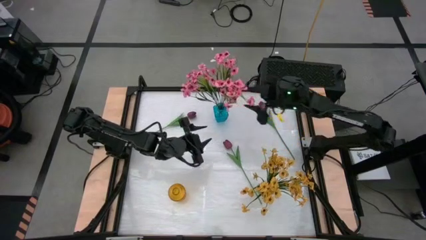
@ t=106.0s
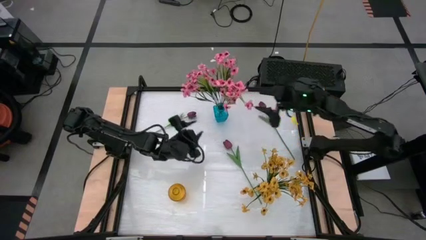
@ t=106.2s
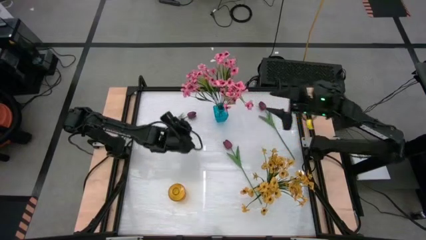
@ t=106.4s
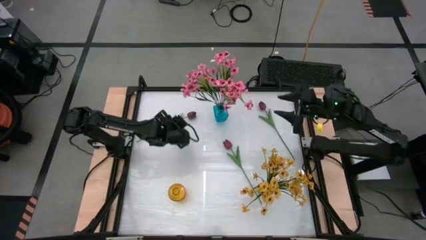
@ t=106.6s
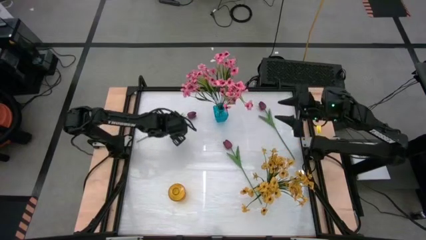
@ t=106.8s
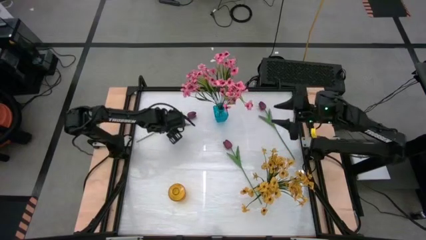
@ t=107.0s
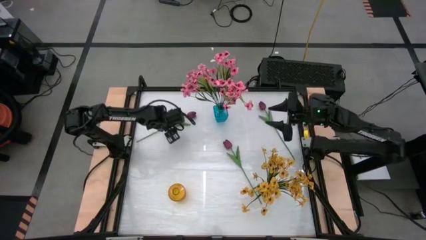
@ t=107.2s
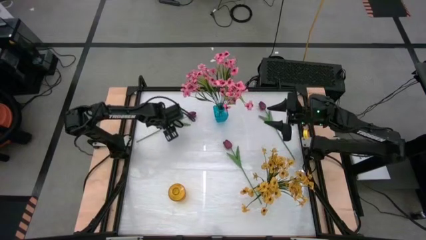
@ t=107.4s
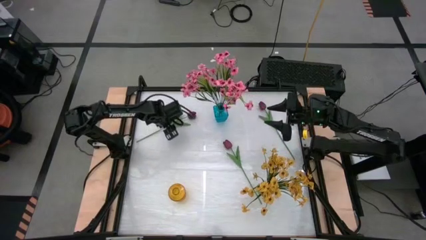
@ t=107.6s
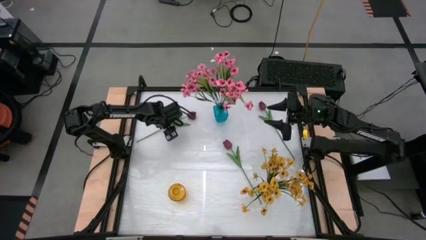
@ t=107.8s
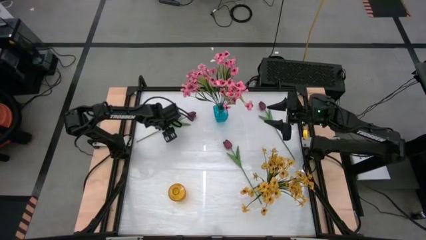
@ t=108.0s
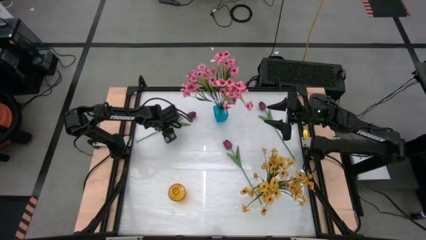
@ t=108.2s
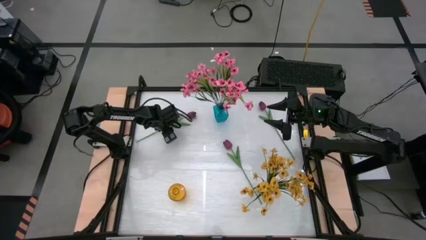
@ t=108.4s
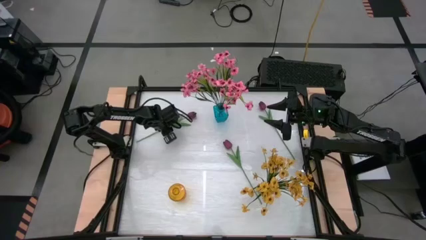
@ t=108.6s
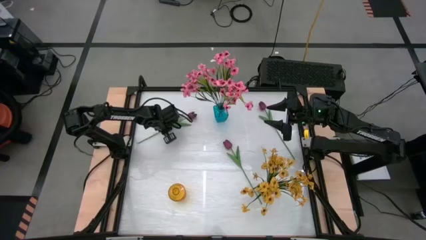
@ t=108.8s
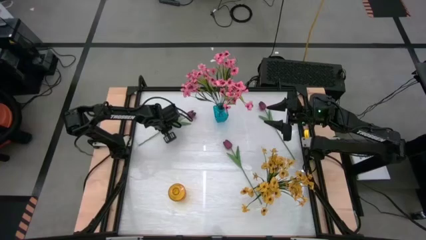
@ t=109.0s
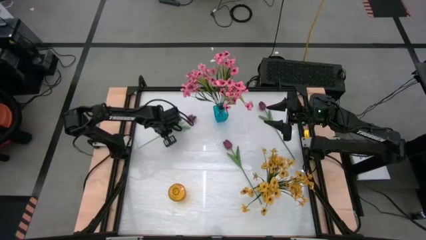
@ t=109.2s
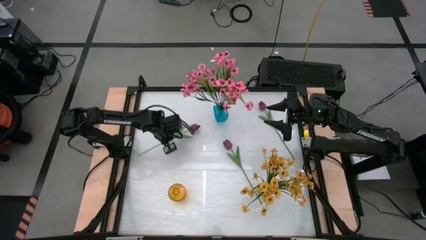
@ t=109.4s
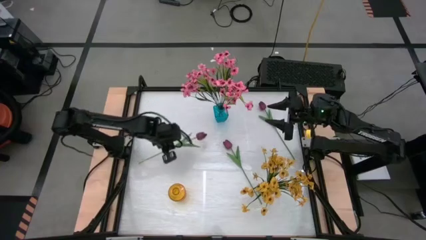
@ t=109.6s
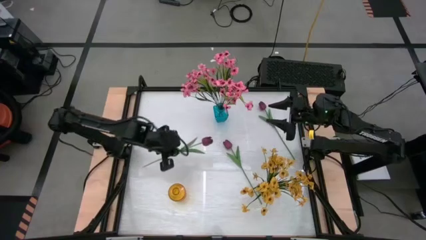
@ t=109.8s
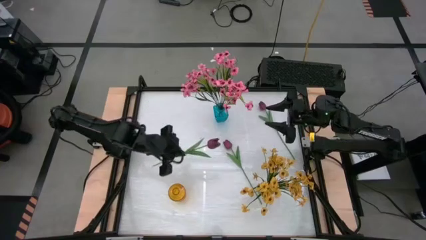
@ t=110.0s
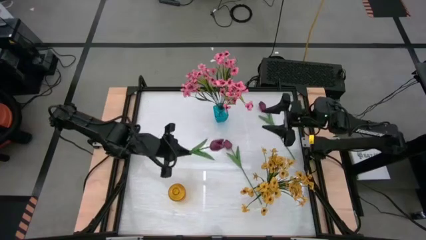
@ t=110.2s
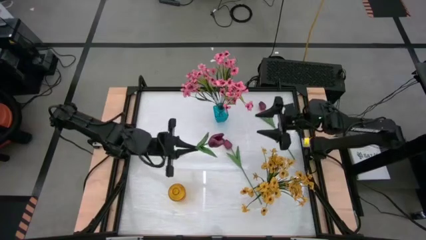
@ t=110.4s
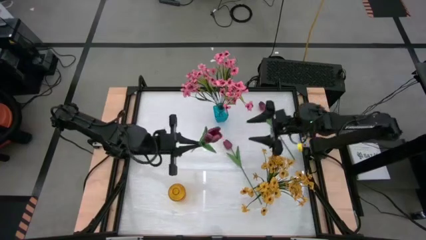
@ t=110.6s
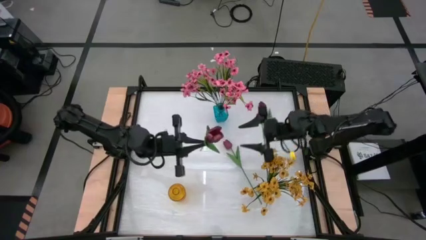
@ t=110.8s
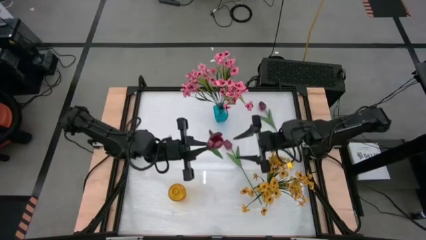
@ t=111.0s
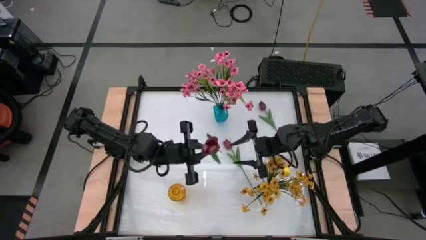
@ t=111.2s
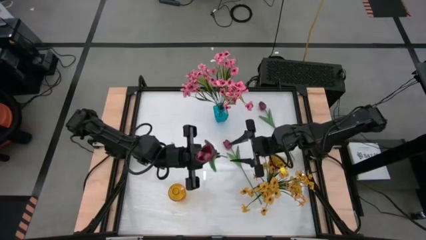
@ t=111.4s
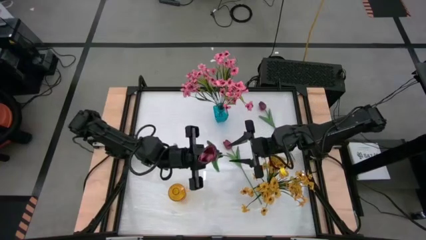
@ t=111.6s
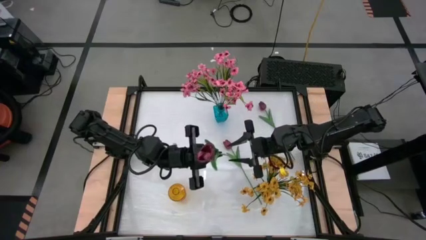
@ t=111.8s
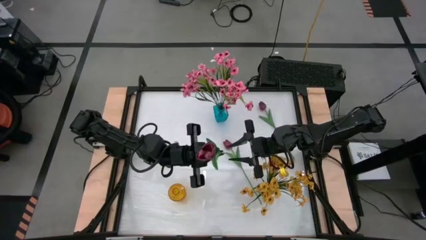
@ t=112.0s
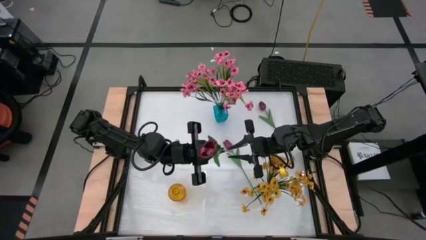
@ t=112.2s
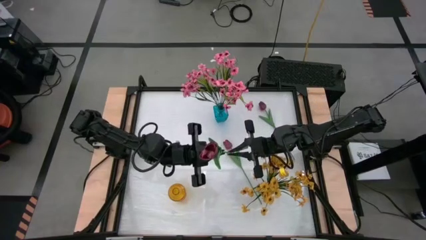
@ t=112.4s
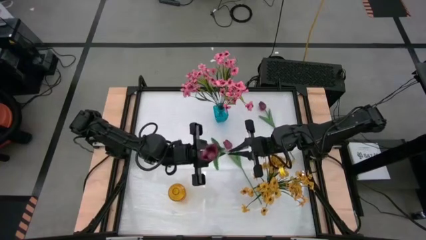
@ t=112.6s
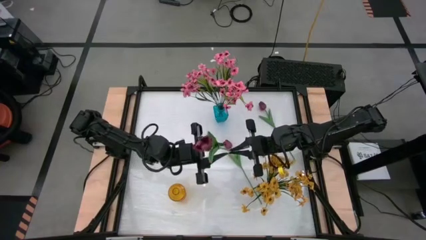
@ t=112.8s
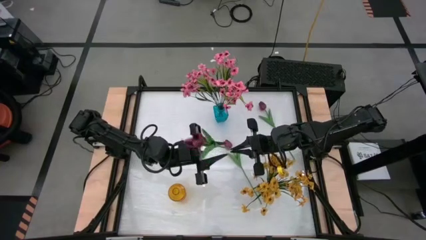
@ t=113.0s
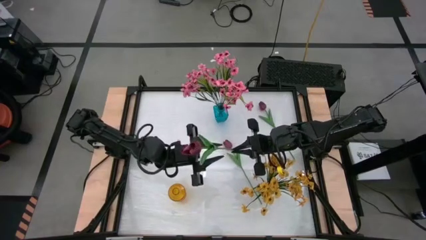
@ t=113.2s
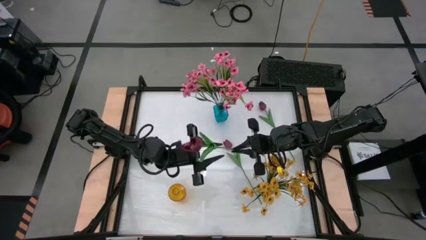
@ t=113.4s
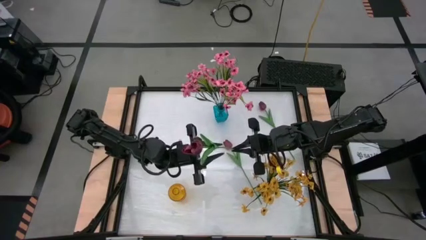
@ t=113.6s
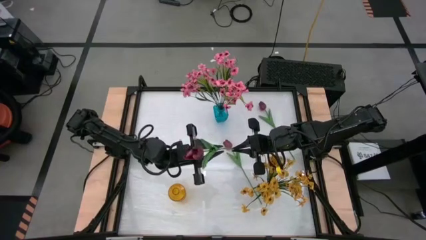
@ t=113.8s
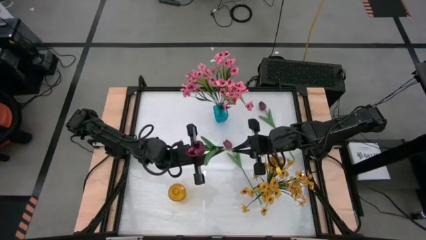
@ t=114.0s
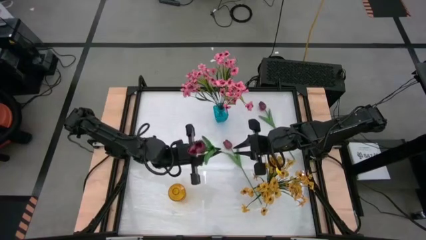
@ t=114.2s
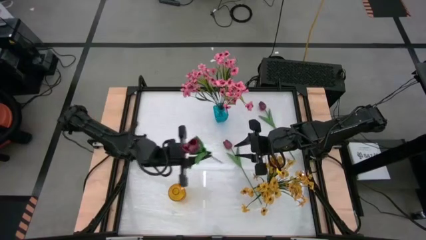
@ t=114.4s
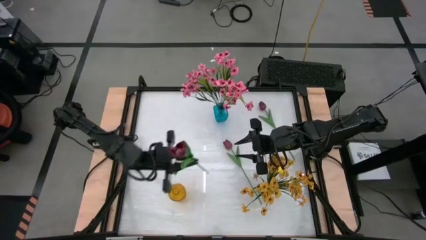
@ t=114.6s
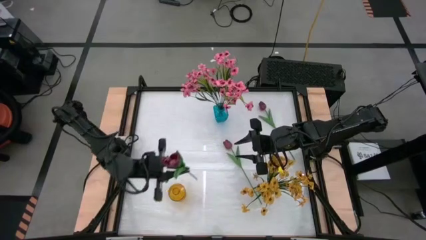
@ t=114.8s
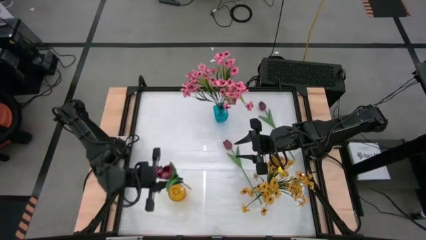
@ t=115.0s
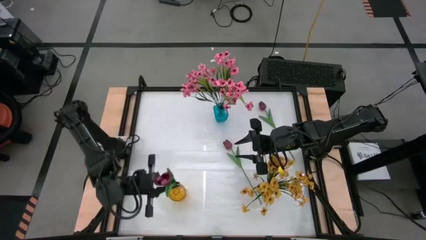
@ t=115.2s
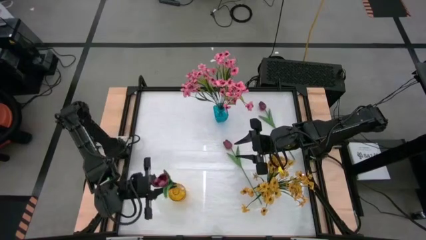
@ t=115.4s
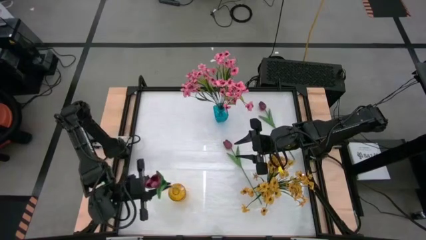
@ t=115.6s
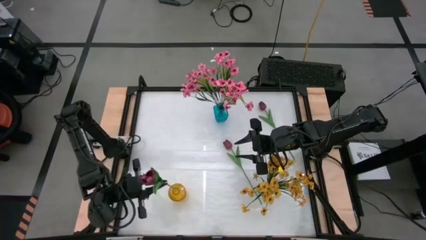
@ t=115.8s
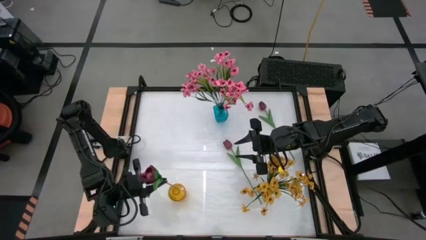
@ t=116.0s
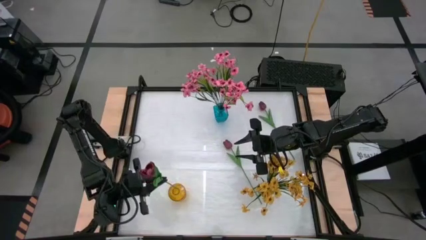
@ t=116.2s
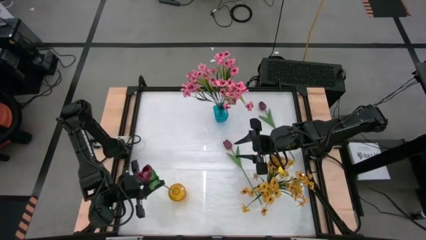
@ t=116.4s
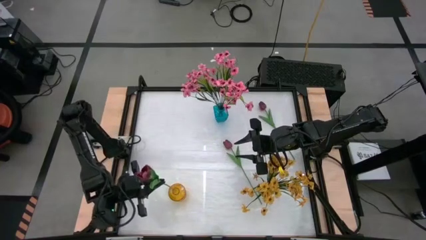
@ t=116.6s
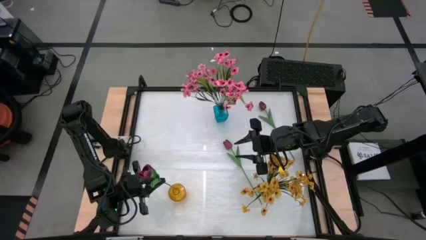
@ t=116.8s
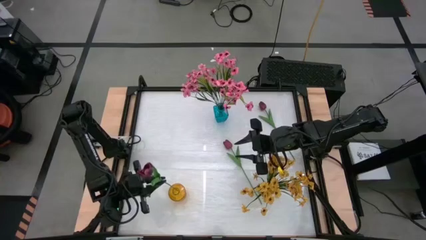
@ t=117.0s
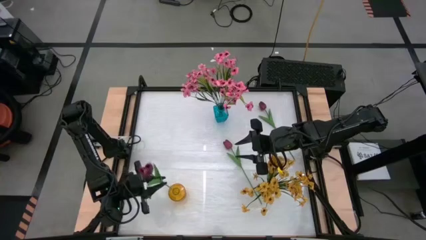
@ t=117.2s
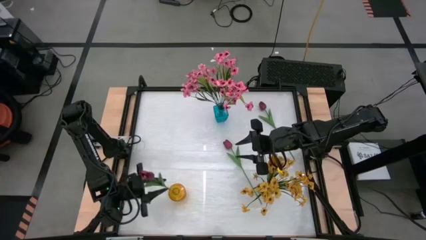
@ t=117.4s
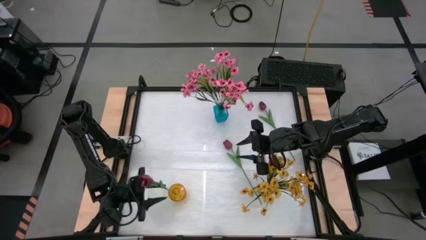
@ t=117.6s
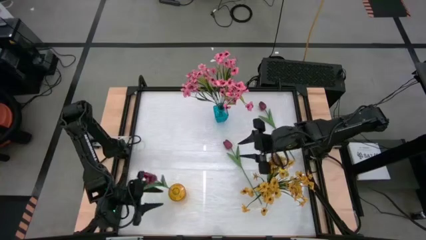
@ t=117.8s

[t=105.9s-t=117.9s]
Task: Sort flowers into vase by color
Put the top left dark red tulip into the yellow vase

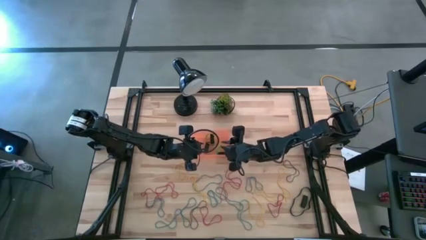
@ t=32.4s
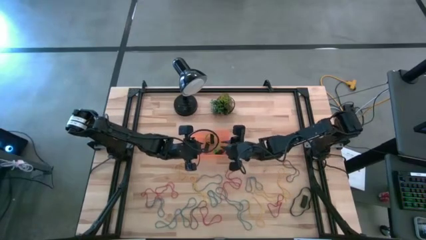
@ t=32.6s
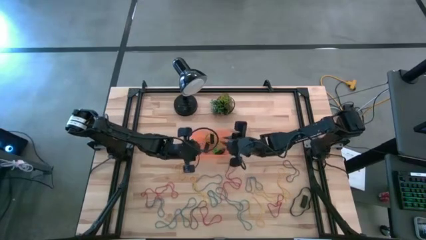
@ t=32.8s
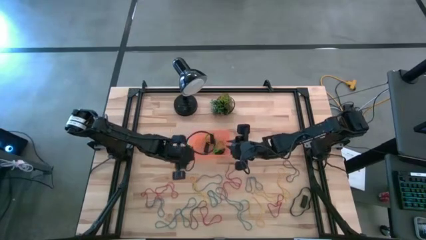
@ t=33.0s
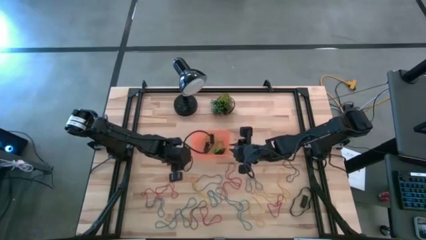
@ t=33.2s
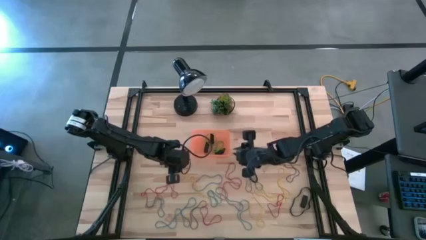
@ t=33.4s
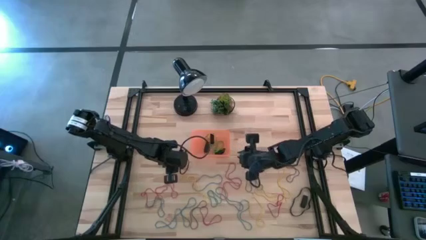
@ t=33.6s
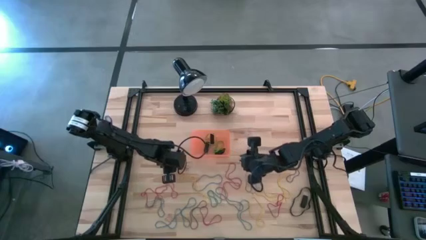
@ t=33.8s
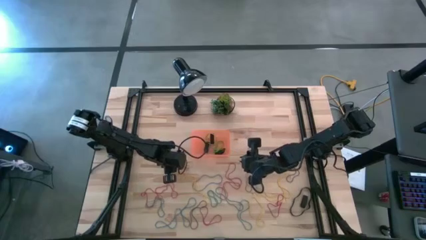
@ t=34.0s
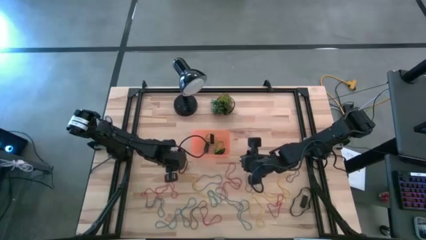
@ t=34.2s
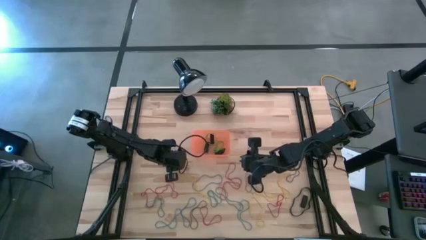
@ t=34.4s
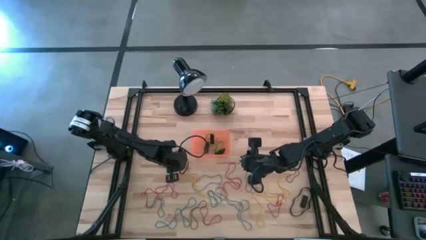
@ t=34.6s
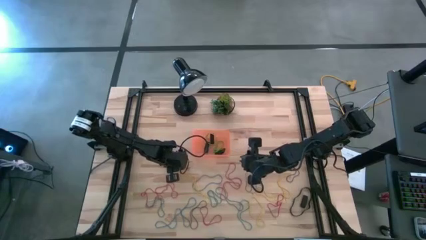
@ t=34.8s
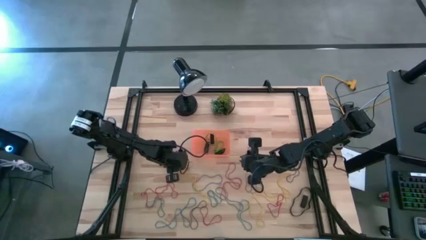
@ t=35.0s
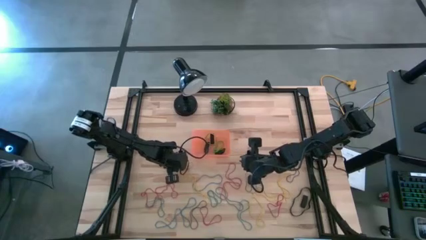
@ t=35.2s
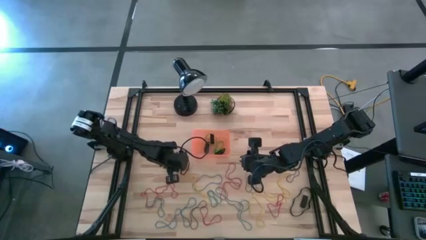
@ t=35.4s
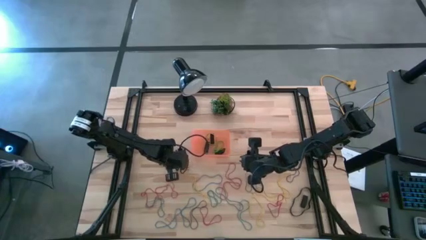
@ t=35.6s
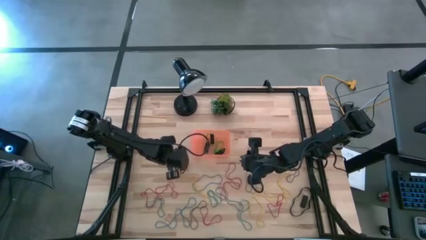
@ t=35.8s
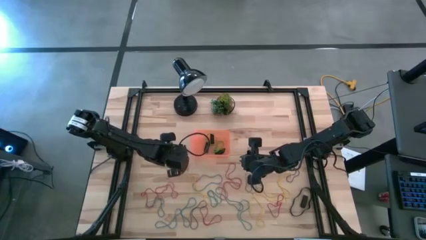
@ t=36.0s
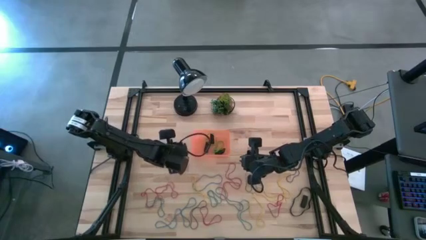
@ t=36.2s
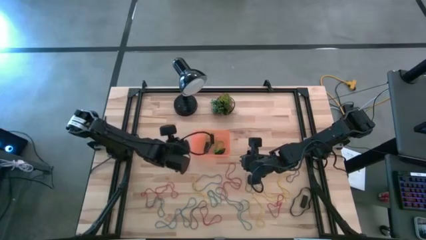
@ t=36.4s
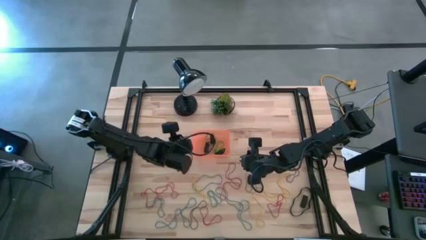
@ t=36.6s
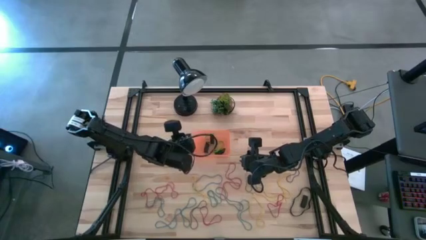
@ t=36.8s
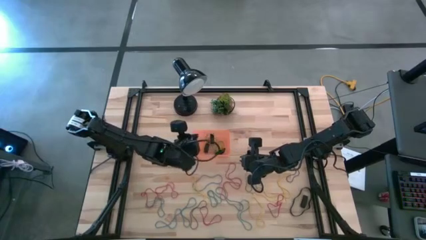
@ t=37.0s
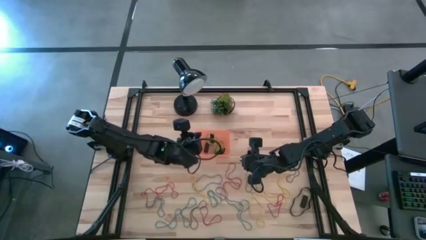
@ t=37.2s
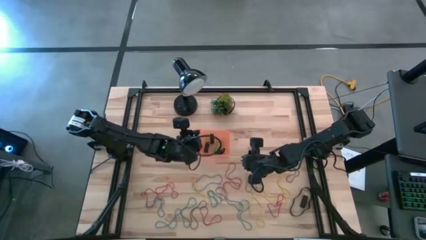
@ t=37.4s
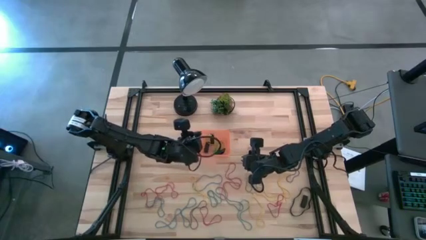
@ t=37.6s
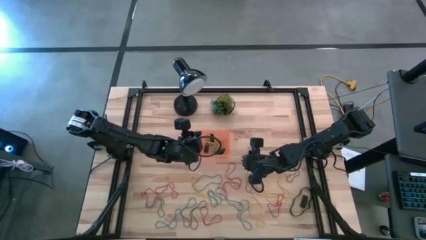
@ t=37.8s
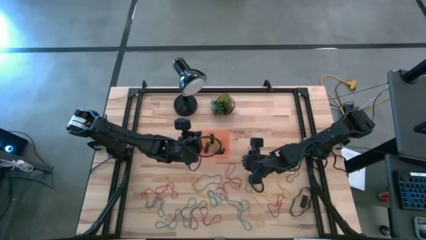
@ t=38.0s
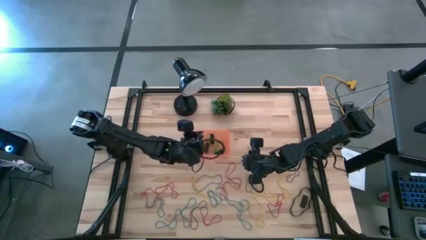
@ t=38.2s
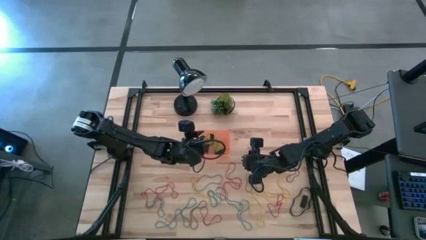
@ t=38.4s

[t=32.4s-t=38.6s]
Task: Pick and place rubber bands into bin
Put the yellow rubberband into the orange bin
